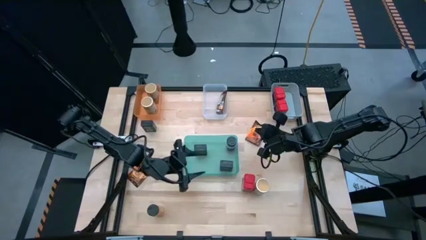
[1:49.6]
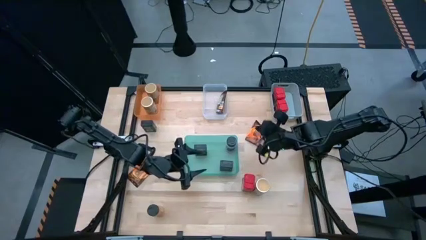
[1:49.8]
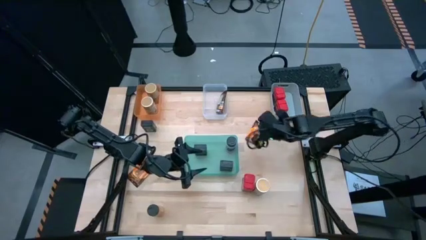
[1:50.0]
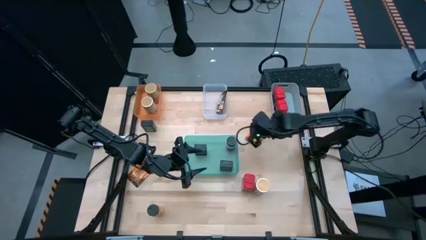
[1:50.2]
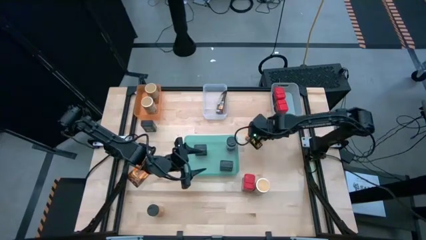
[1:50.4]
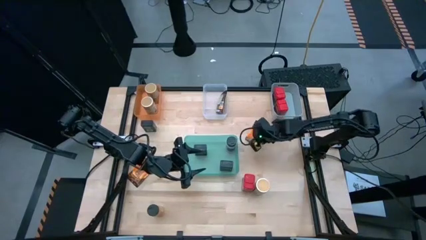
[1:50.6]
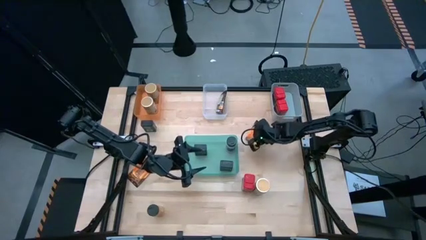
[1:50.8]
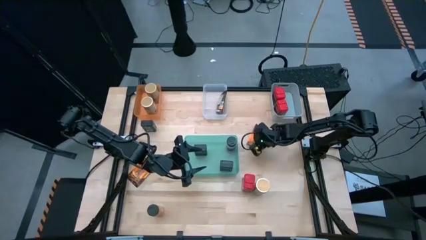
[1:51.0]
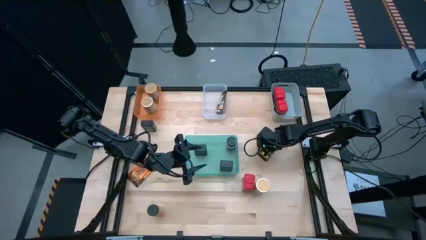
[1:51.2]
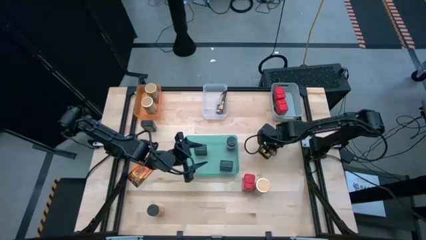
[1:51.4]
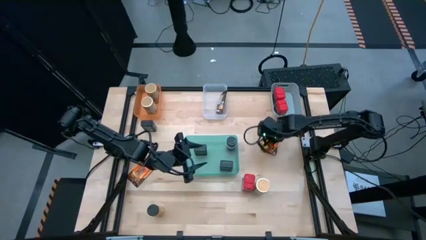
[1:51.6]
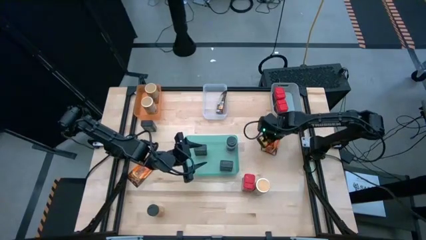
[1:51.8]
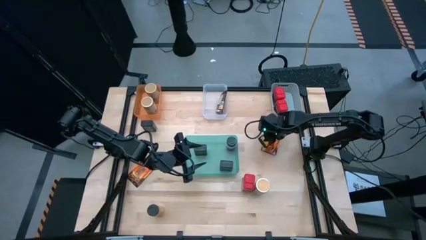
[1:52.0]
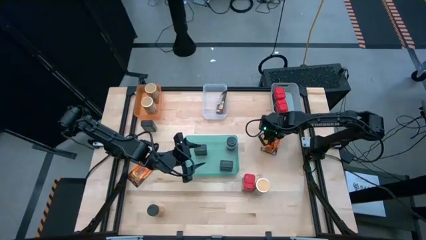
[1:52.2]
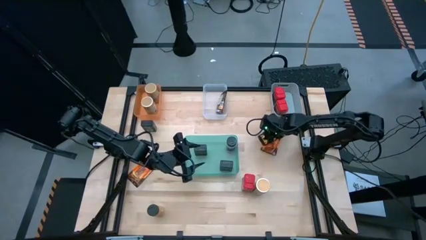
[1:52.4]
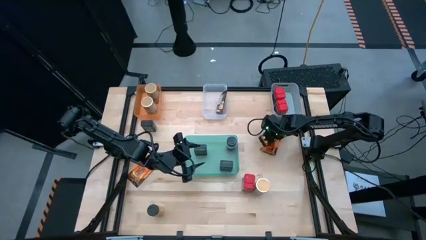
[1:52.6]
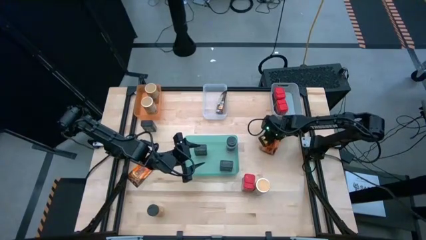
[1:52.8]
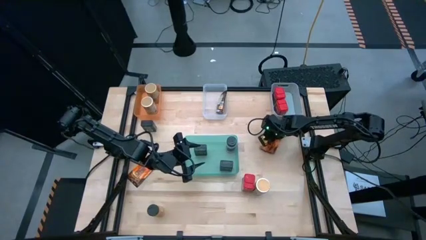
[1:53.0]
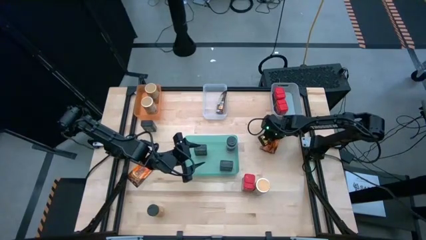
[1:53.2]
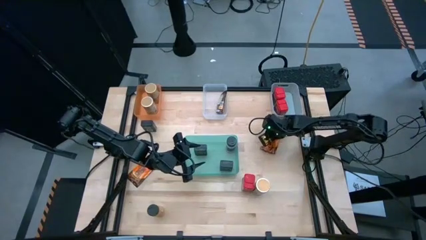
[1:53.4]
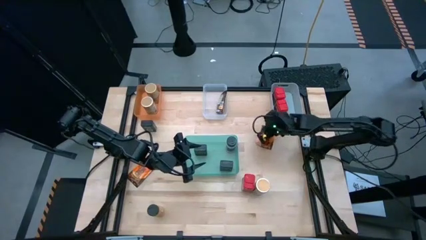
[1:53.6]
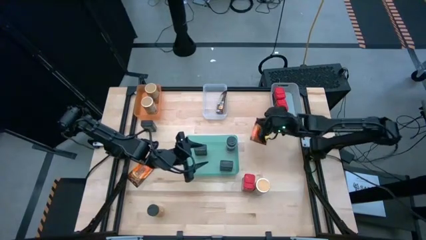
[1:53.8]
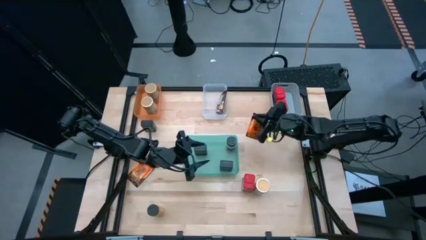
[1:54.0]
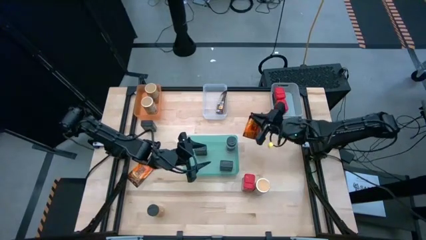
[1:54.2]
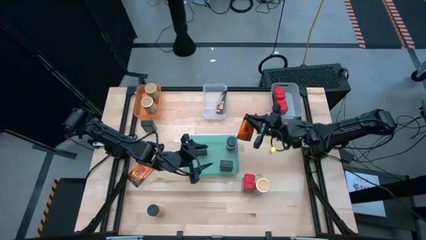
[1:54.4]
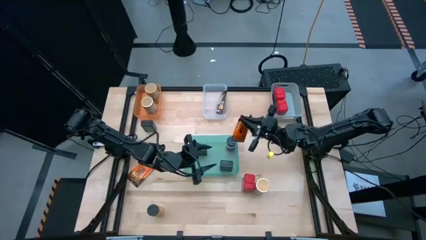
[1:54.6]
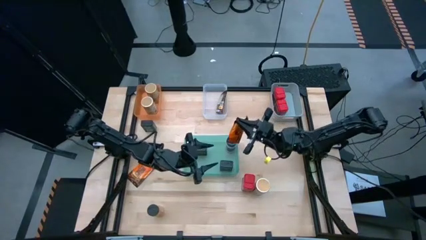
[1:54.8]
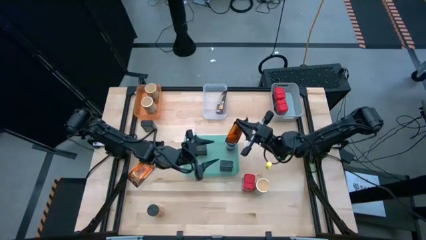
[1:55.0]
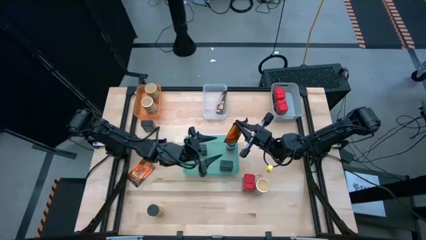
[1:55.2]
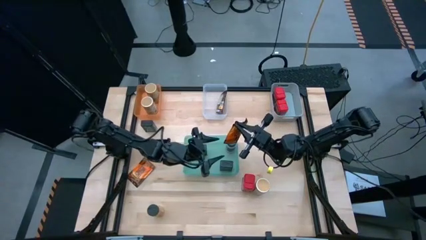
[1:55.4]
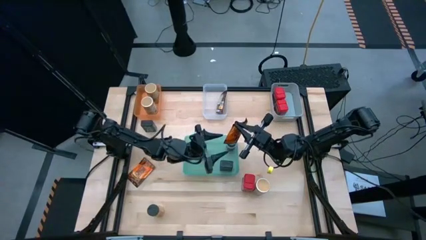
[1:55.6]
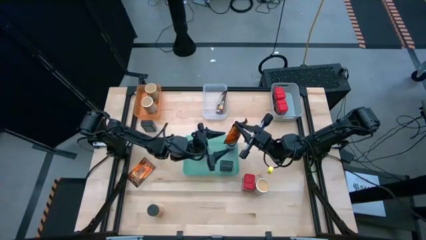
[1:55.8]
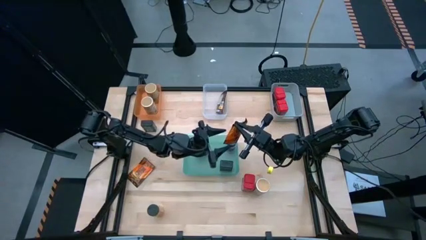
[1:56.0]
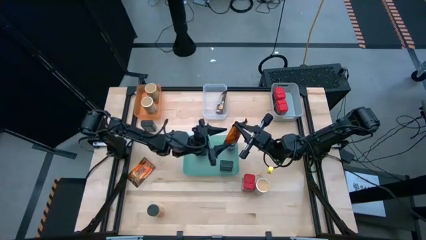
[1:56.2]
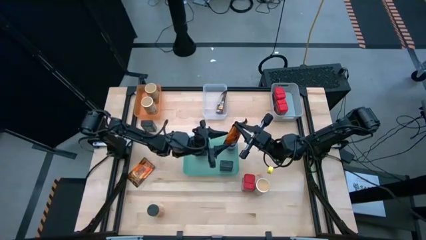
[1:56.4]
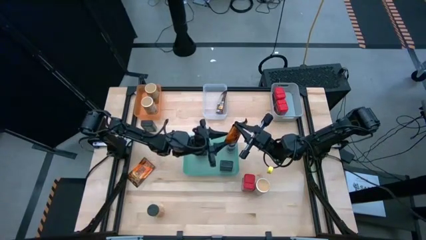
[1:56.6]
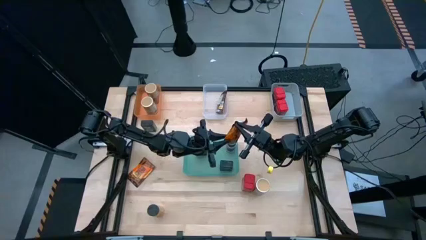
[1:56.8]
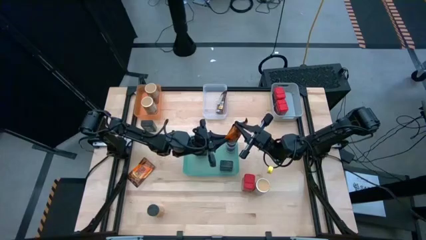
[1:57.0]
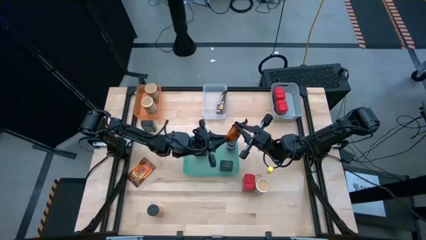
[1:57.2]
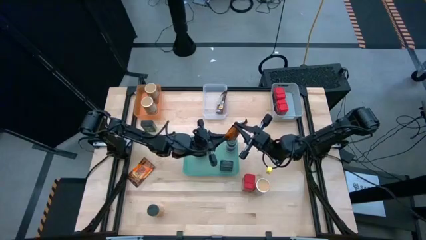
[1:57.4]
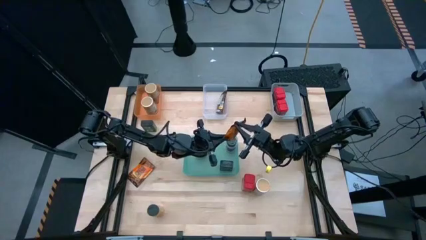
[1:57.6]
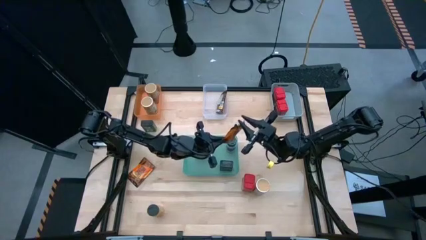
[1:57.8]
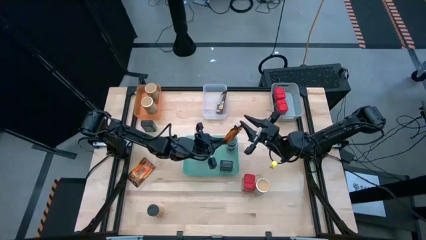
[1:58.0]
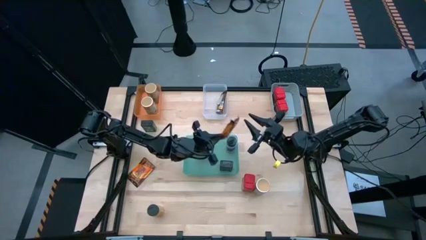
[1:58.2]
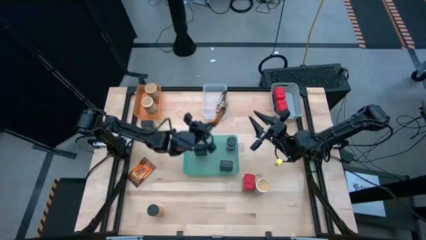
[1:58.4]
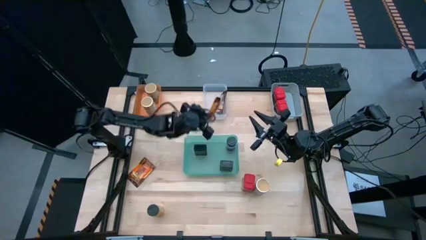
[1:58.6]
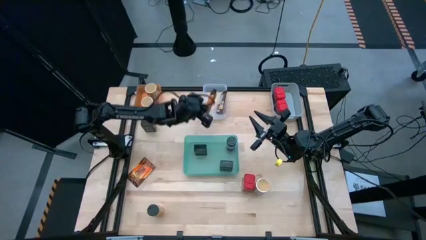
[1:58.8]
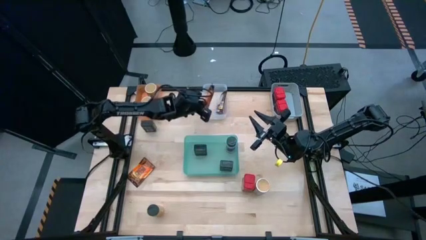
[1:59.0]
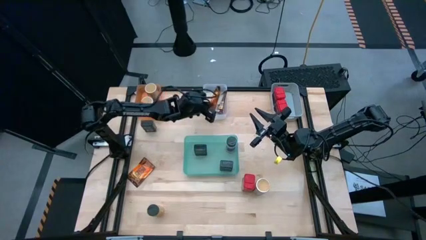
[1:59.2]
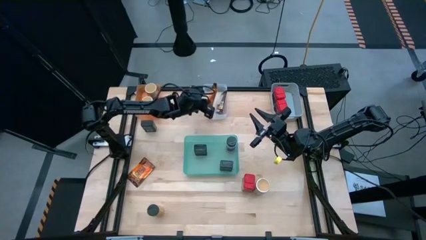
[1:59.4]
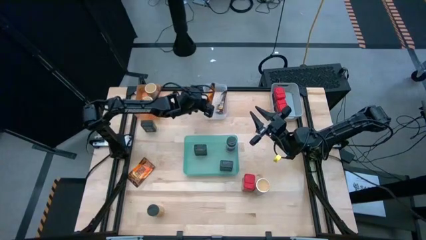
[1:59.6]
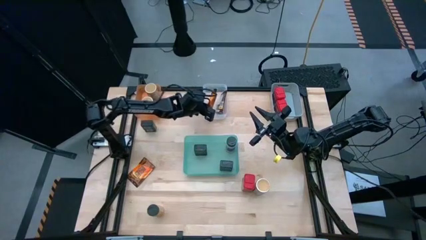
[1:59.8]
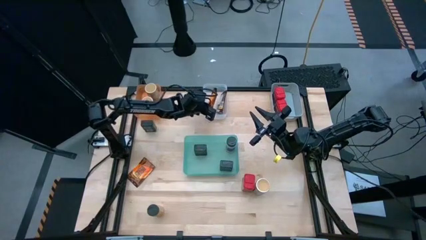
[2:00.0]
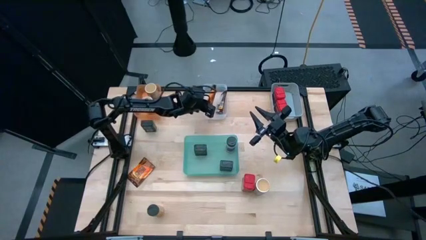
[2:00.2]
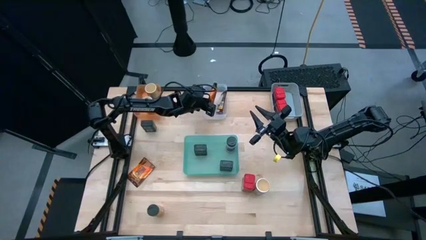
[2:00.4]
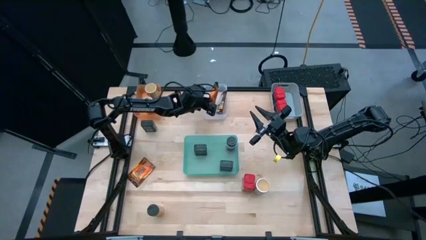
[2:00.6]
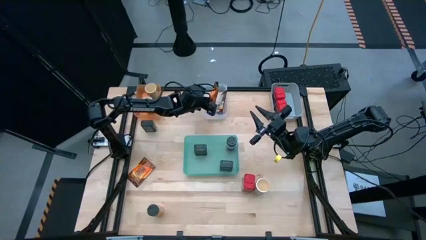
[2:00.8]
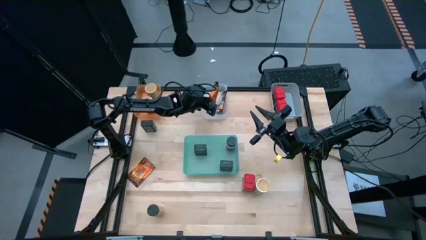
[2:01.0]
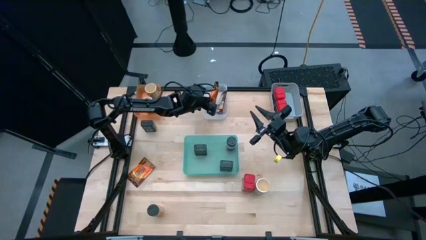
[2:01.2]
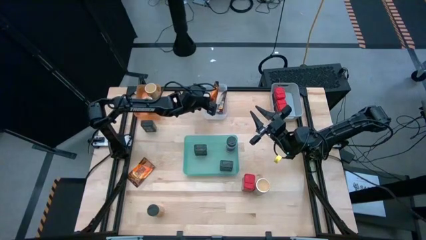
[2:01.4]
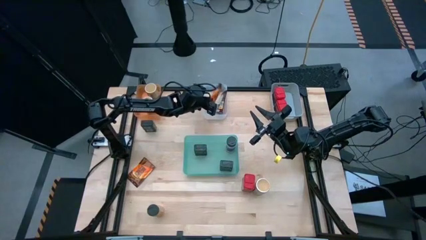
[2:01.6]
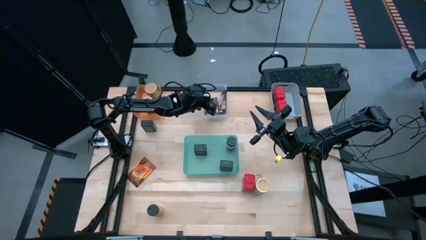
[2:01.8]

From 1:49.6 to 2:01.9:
Task: Sort spices by type
Put the right orange spice pack into the transparent bin

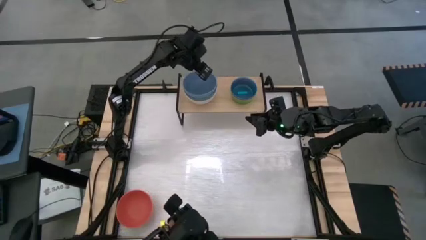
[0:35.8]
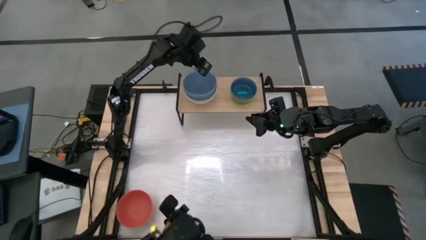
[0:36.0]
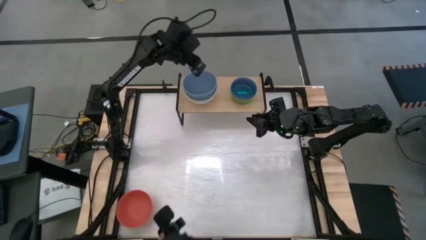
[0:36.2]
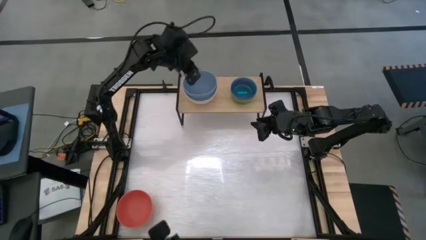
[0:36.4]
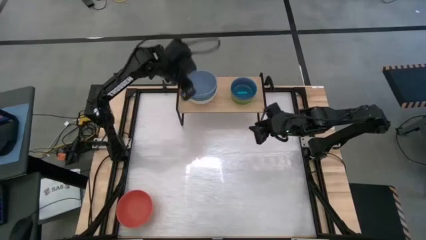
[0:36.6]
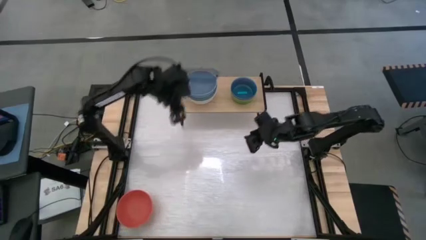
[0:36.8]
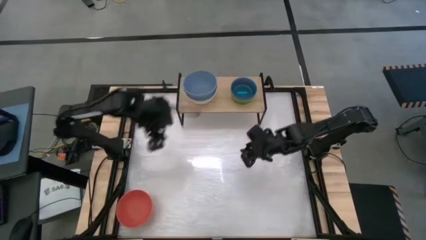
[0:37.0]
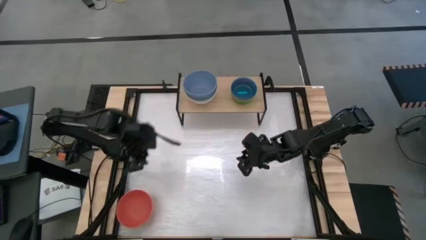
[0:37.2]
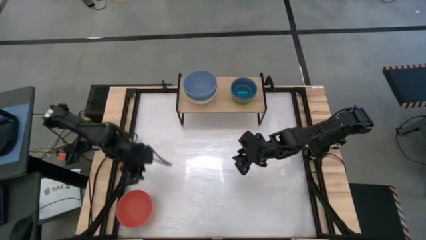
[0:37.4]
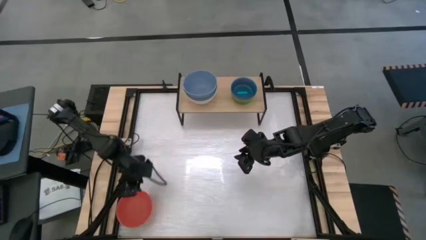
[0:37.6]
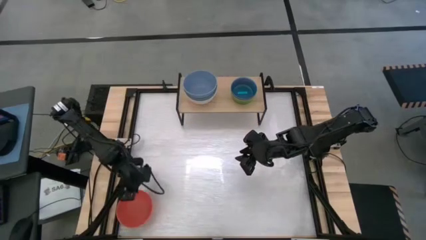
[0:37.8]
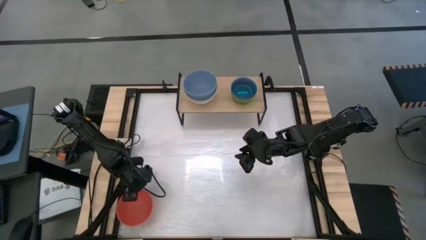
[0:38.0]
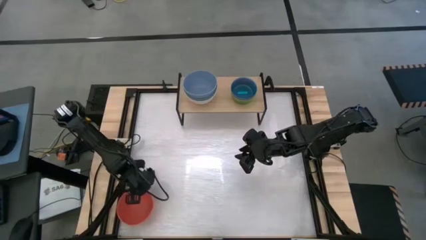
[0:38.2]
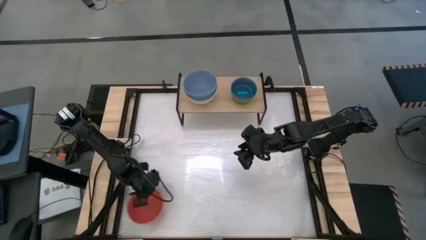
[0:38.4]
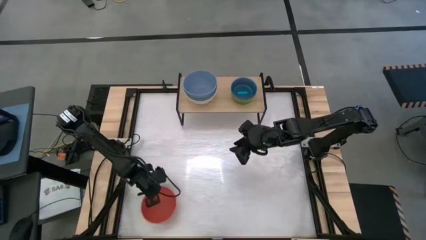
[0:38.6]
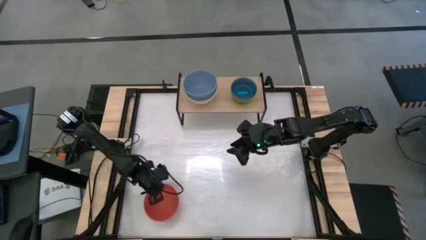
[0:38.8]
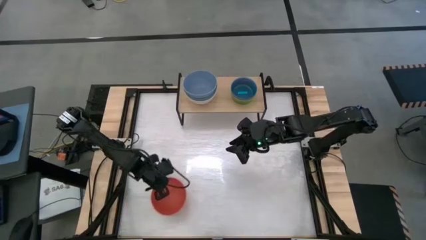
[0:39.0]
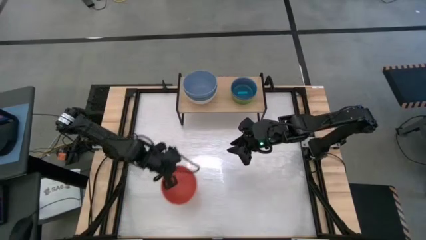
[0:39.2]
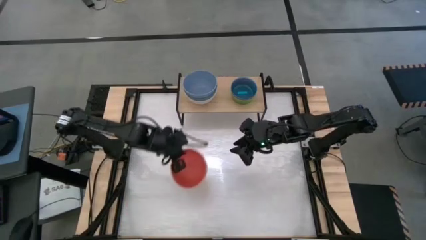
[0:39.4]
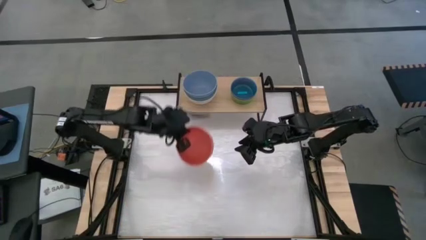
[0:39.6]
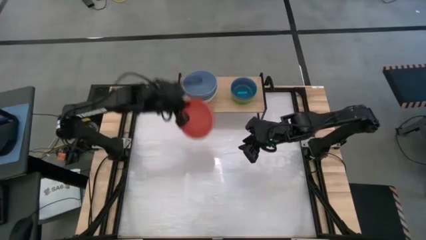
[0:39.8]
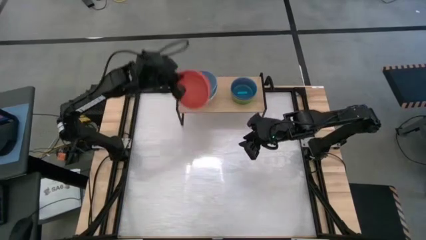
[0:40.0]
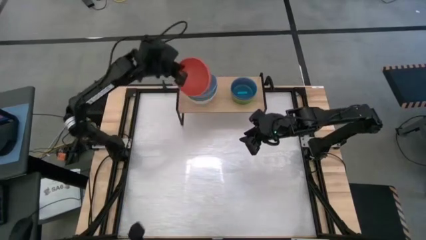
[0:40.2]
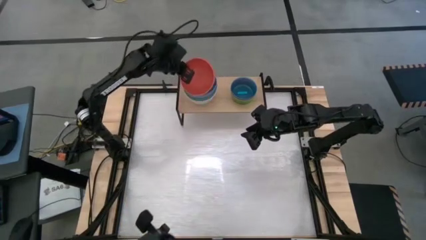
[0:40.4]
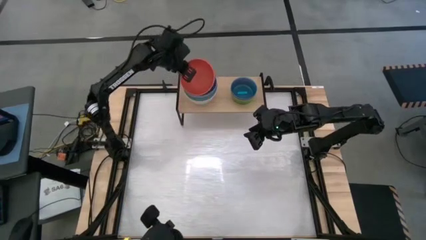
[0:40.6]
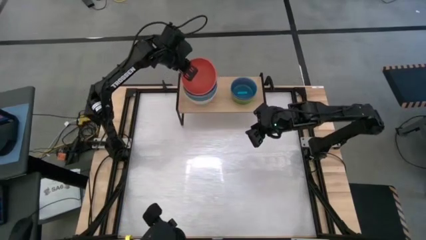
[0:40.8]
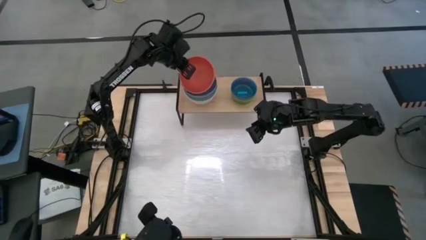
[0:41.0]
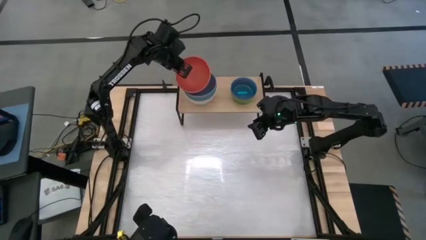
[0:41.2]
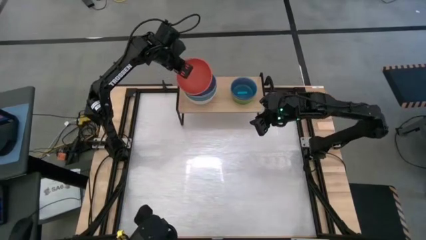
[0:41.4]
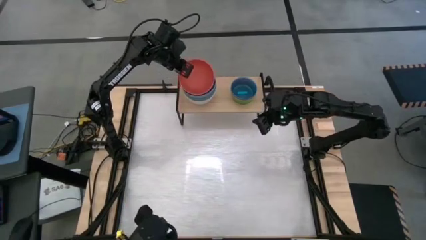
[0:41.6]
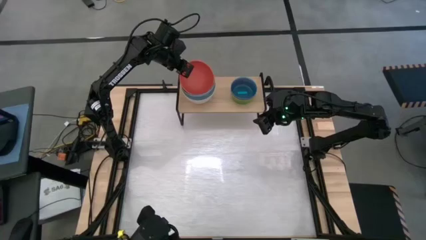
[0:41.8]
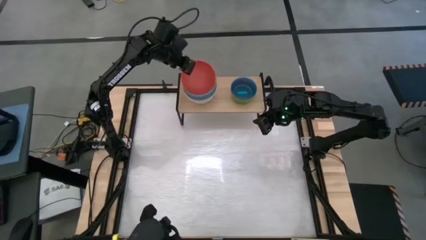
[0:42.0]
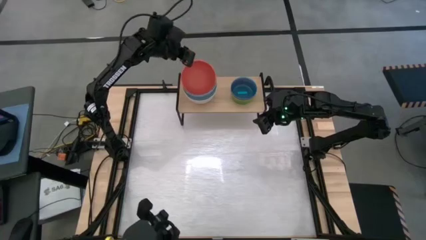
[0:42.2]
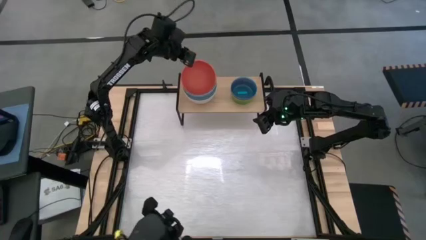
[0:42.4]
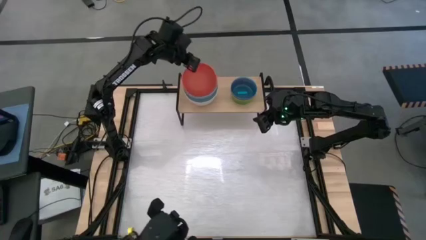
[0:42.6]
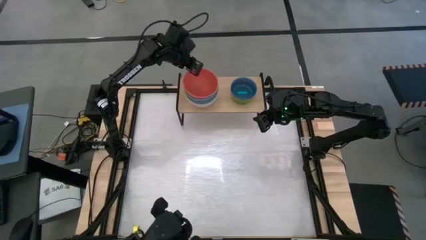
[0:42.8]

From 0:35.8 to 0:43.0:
Task: Place and stack bowls onto a shelf
Stack the large orange bowl on top of the large light blue bowl on the shelf
